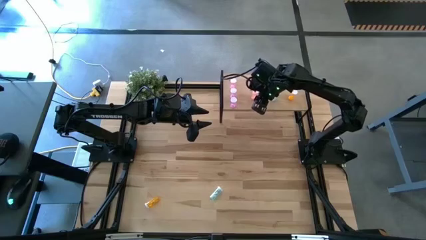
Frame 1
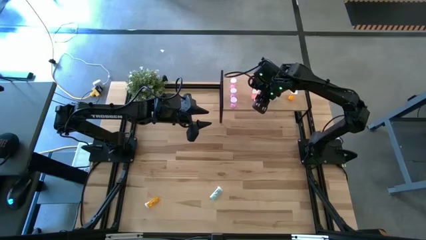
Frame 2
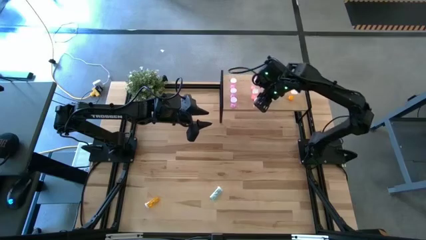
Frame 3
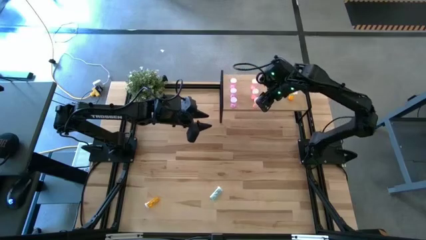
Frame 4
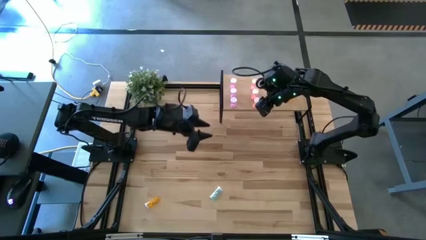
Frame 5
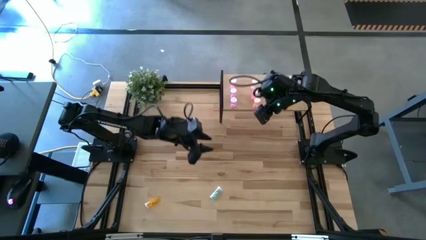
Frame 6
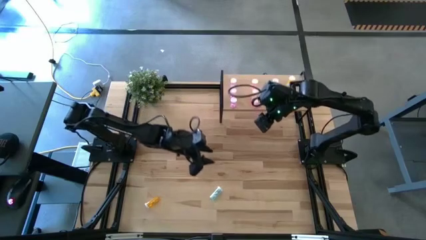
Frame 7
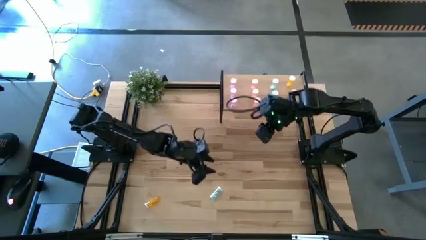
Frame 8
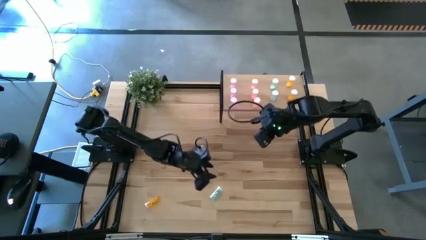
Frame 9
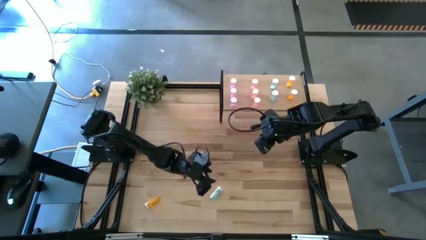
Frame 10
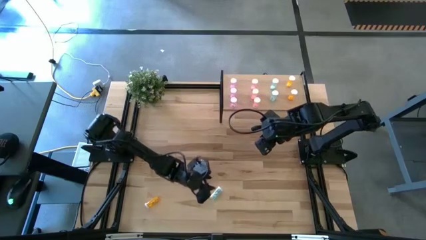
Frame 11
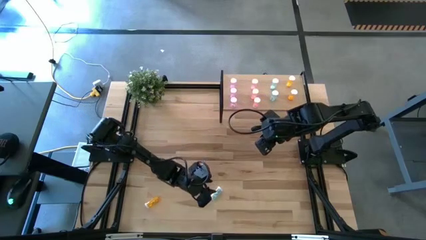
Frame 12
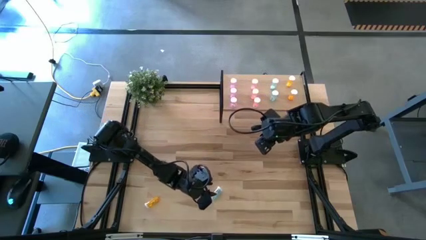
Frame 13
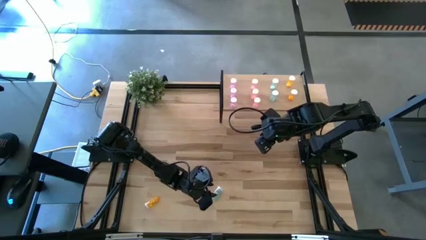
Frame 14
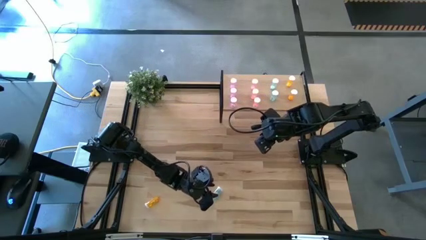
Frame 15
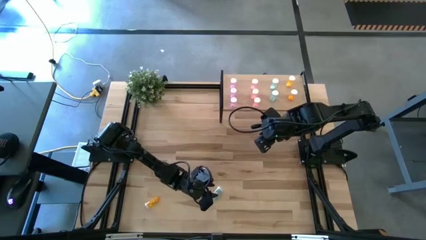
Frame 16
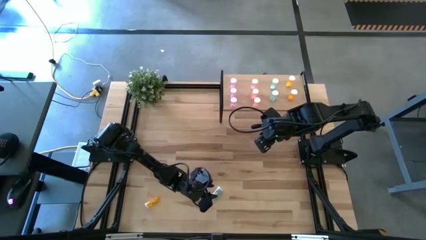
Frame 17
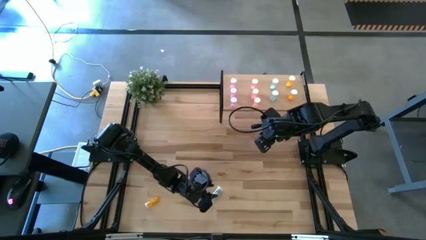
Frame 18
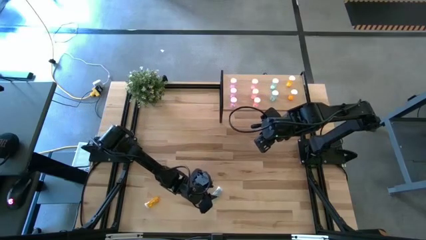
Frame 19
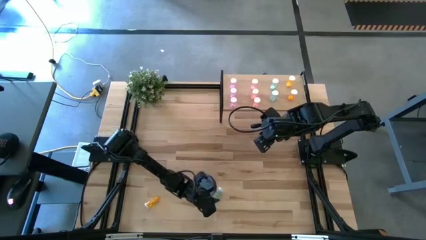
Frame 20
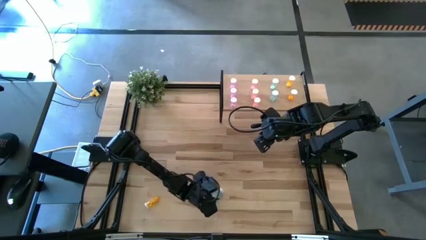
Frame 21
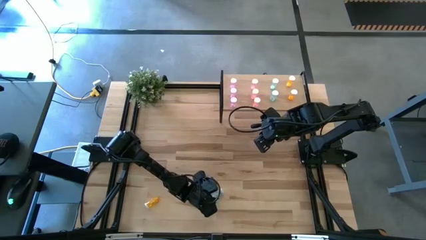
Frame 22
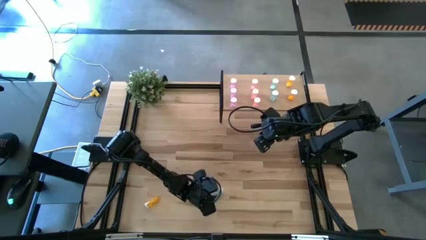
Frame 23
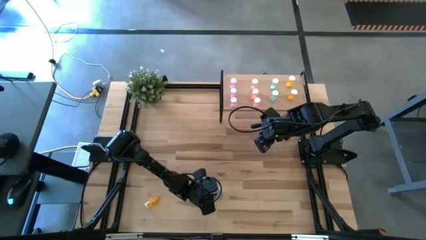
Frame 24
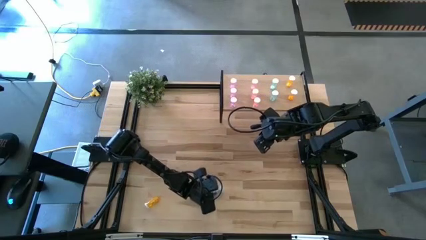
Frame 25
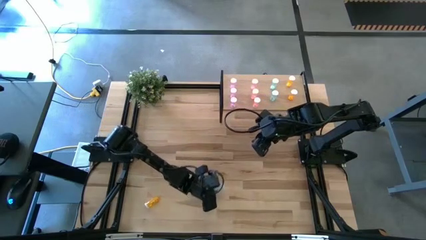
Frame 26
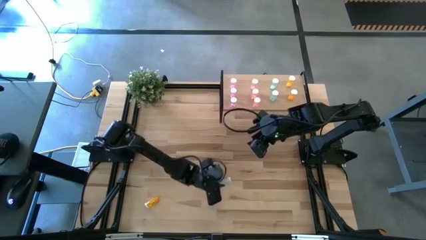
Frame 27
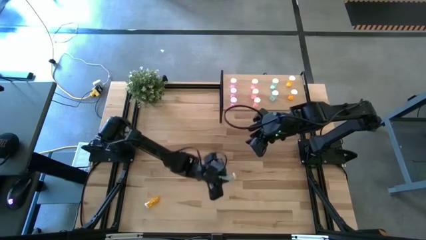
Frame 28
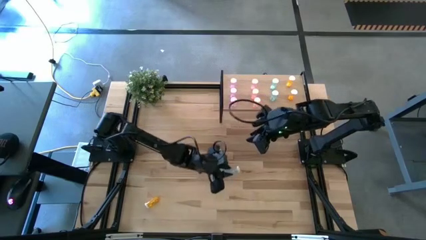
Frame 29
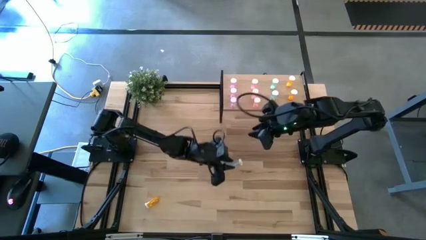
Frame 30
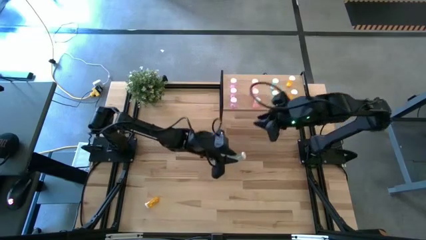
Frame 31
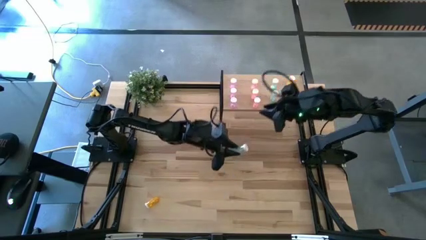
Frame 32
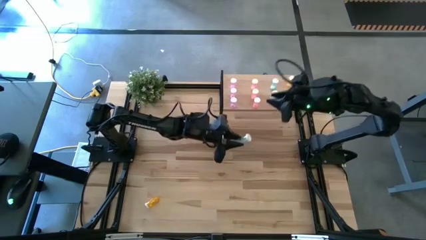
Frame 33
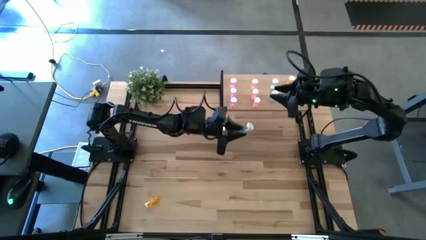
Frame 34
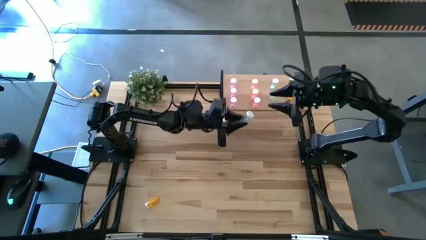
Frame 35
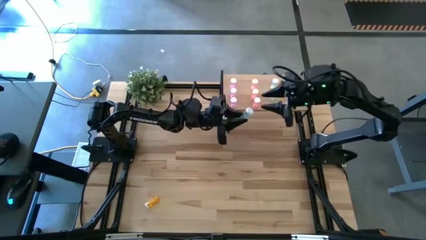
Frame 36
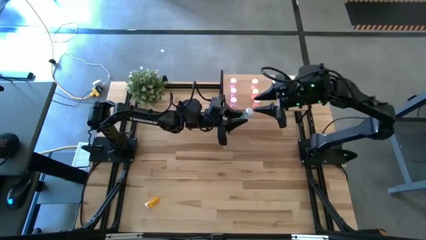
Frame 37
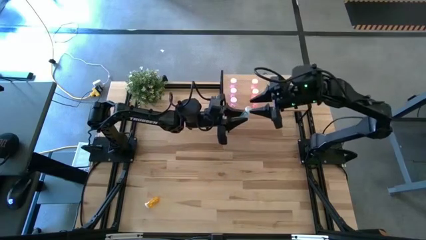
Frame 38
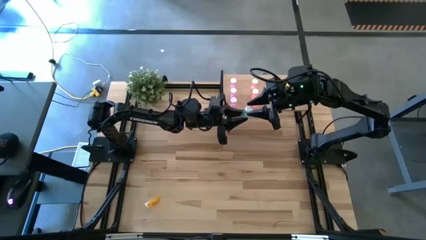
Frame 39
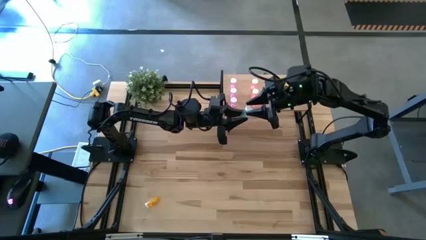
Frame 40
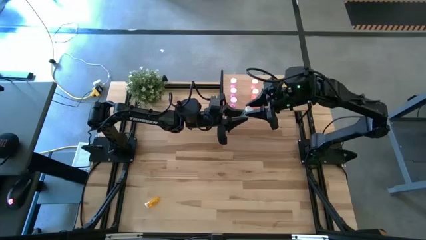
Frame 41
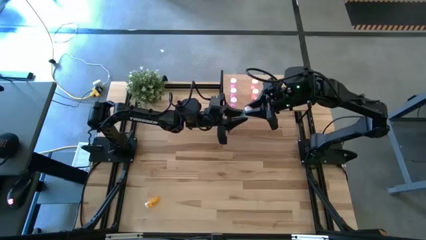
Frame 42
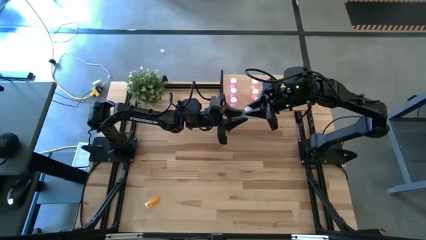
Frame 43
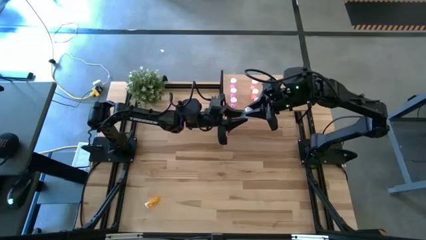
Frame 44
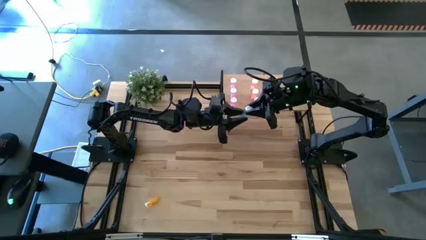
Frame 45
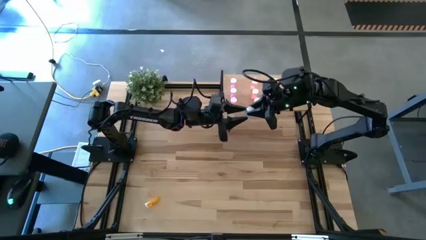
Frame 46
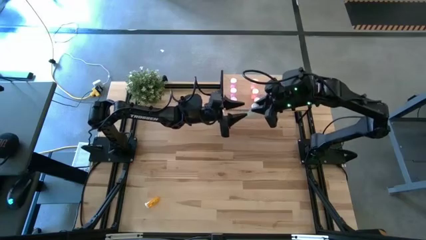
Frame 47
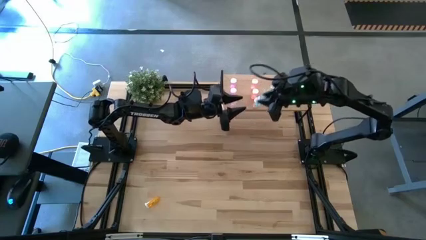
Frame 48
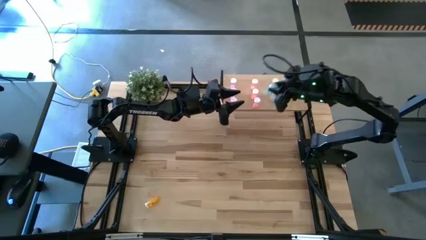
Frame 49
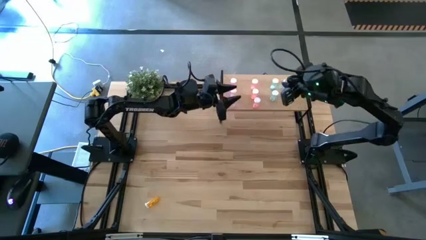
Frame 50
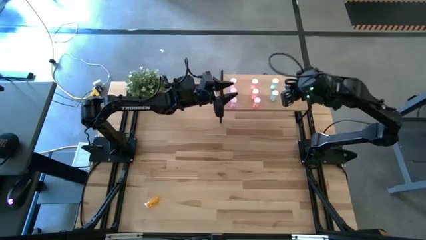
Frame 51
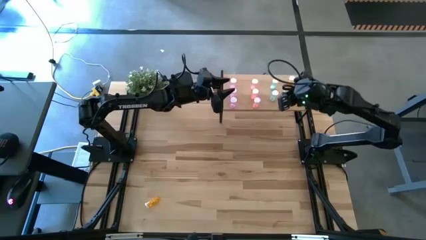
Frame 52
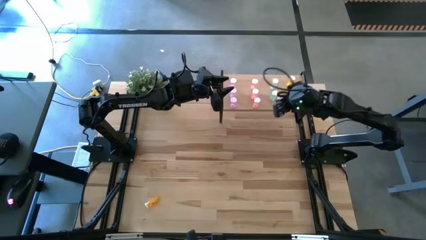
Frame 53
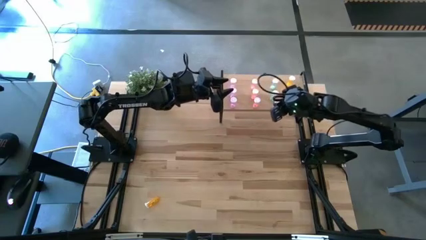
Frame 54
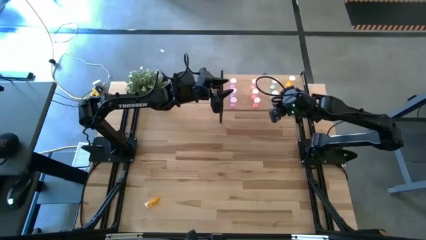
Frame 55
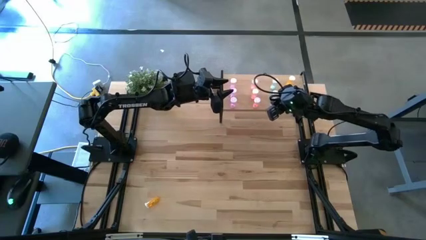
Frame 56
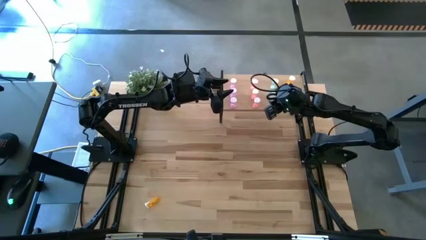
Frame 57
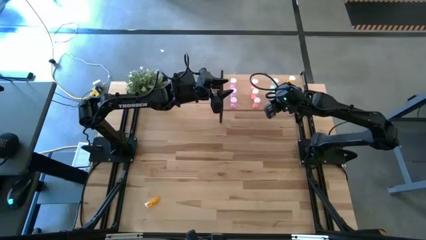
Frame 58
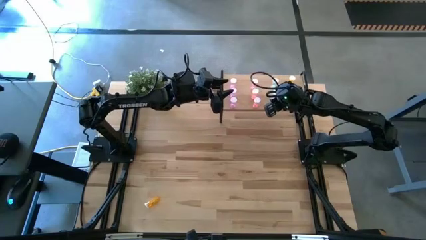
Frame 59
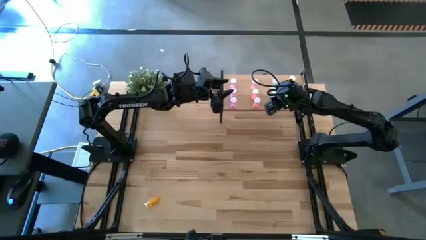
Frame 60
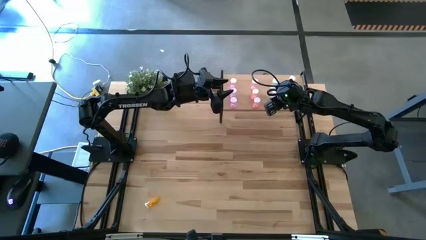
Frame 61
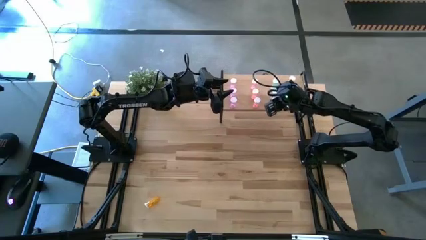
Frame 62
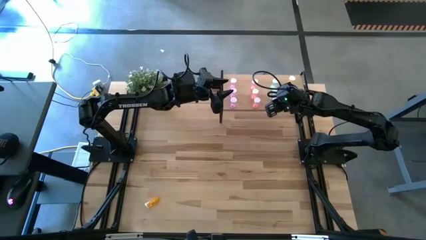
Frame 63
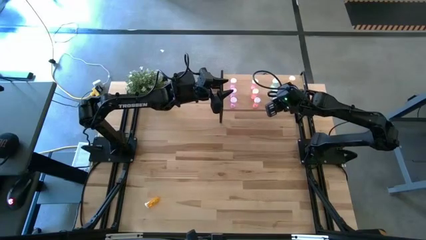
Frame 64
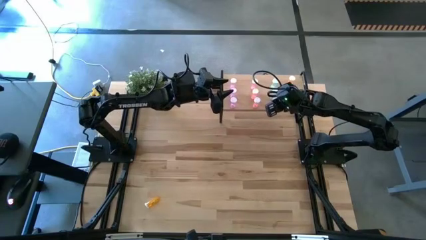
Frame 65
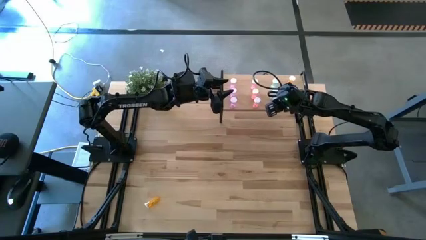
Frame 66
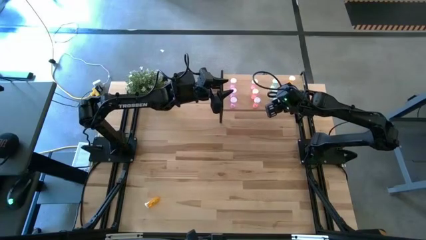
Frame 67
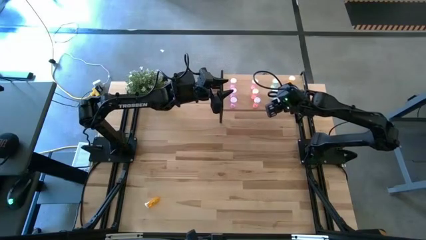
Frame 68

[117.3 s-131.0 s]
Task: Pick and place medicine bottles onto shelf by color
Put the blue pill bottle on the shelf aligned with the other blue pill bottles

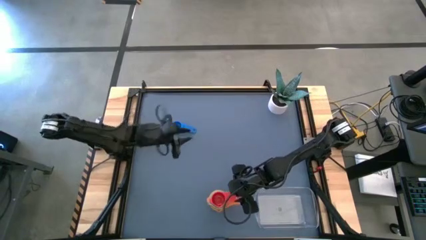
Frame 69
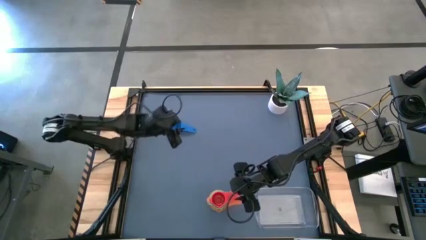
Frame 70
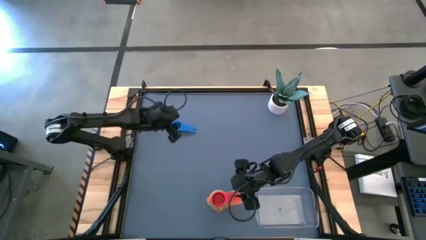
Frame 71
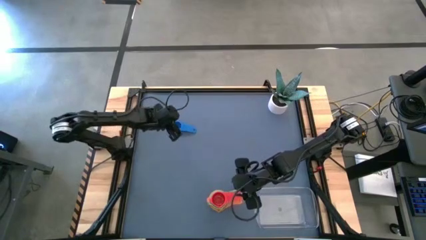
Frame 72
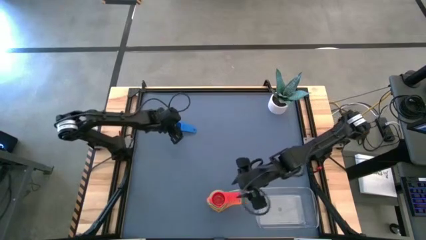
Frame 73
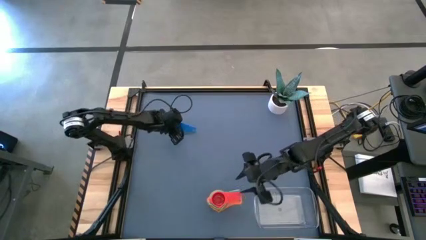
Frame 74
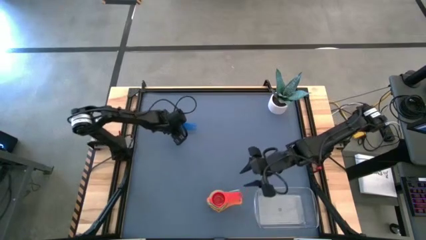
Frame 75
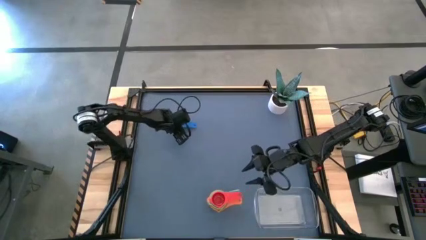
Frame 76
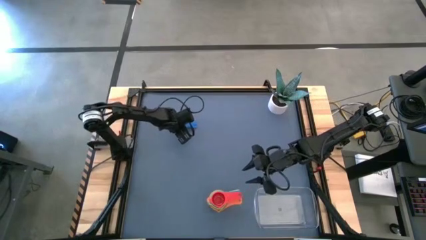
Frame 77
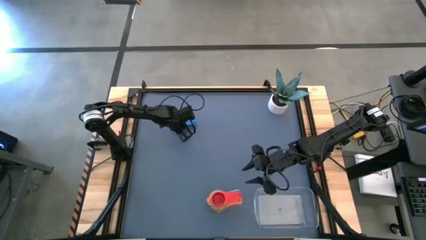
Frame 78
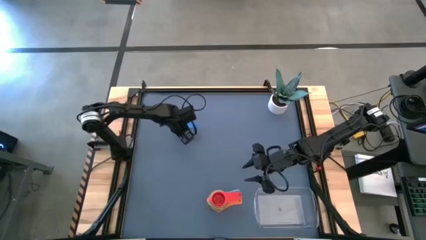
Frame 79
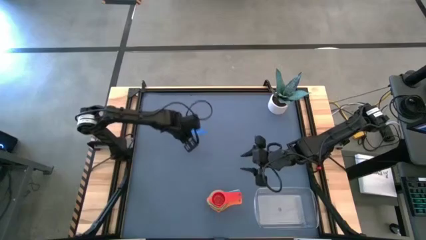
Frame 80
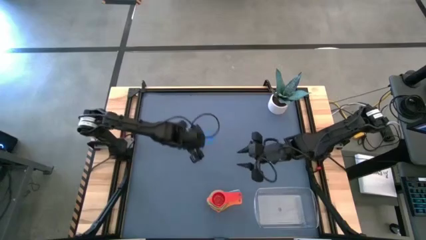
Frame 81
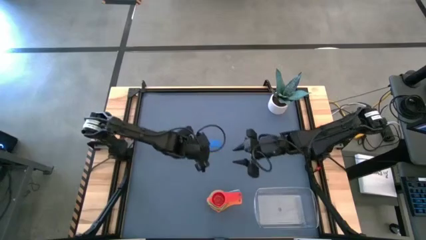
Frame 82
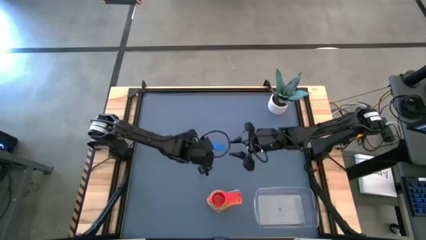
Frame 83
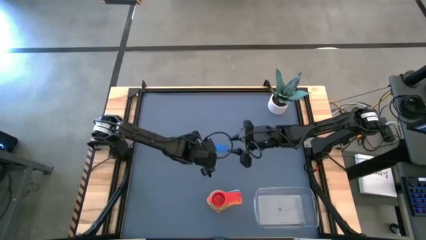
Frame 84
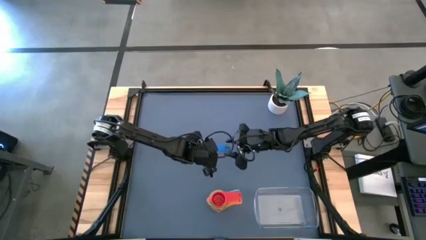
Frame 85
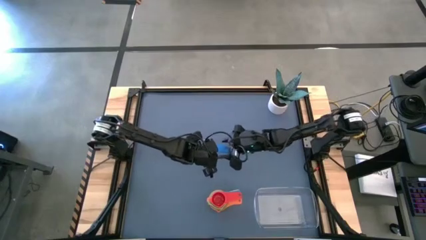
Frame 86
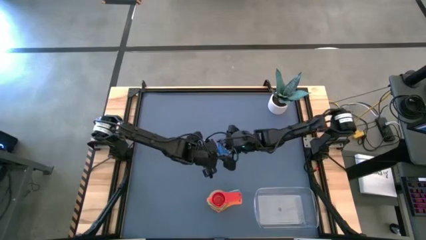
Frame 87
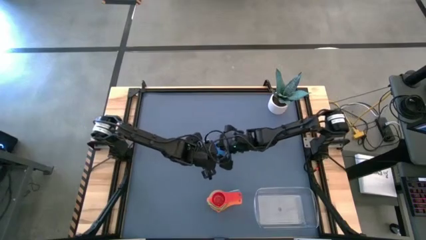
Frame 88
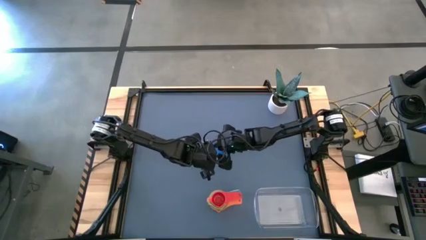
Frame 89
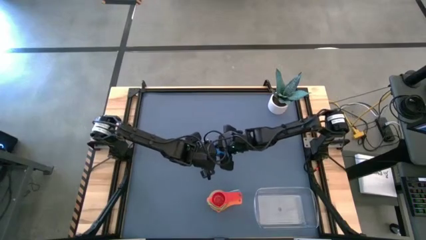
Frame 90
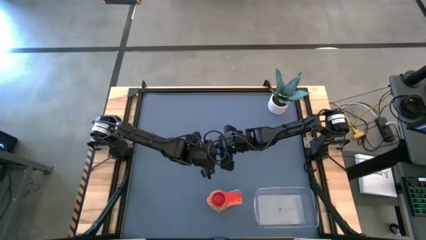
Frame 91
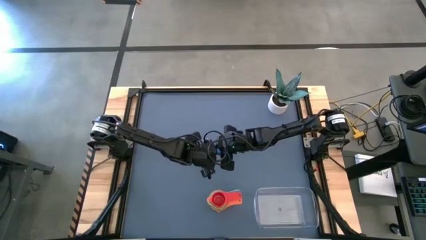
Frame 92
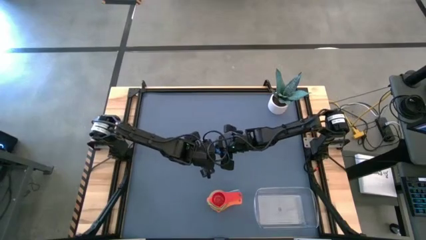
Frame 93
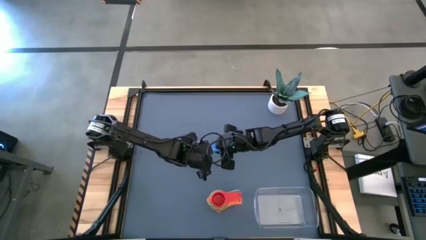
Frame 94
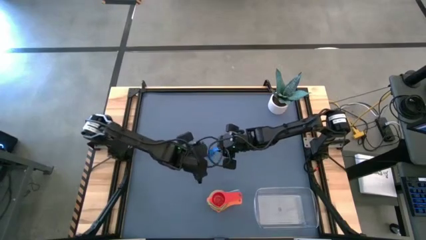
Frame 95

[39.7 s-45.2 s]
Task: Nest measuring cups in basket
Stack the blue measuring cup on top of the red measuring cup
